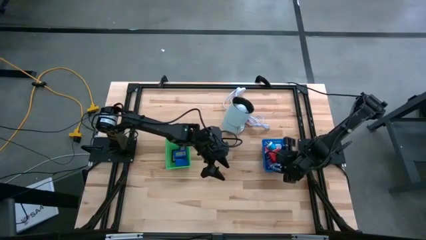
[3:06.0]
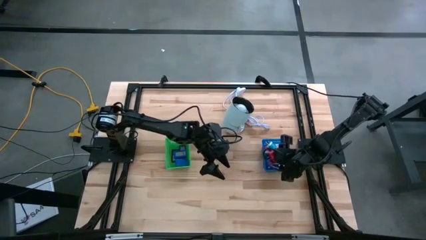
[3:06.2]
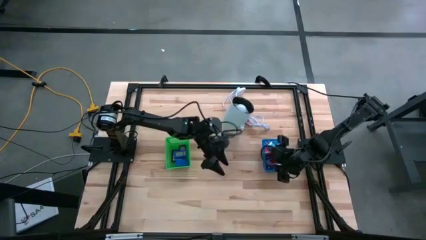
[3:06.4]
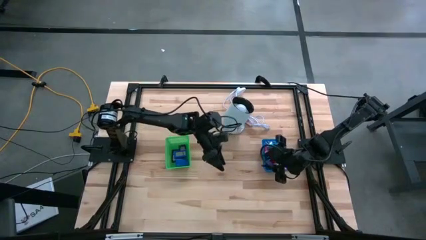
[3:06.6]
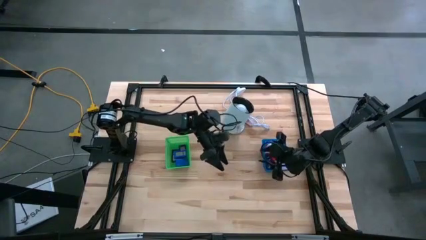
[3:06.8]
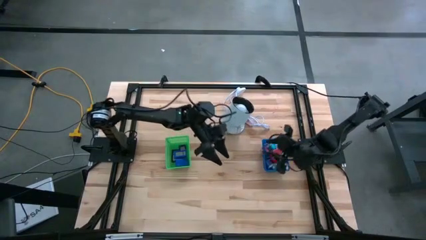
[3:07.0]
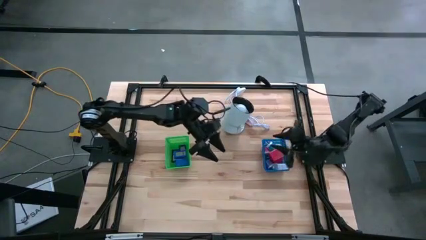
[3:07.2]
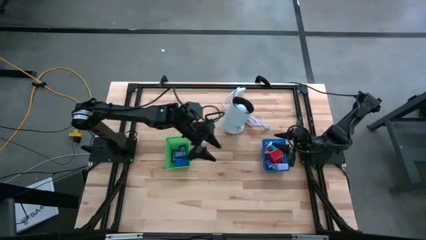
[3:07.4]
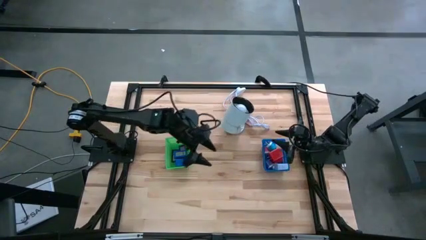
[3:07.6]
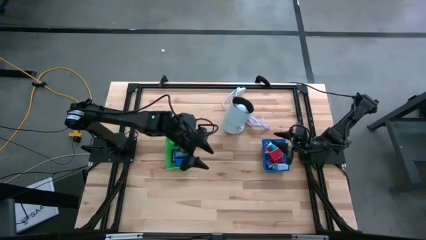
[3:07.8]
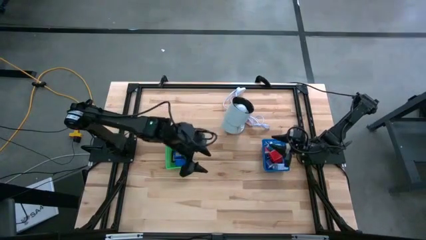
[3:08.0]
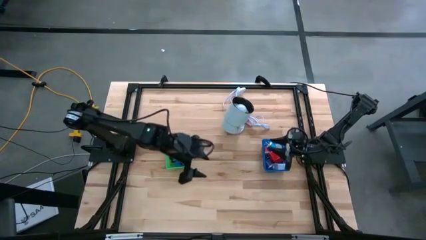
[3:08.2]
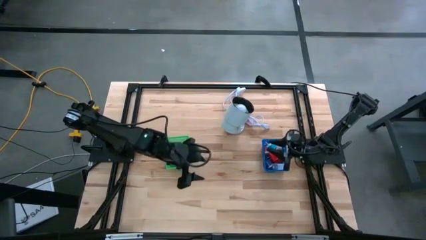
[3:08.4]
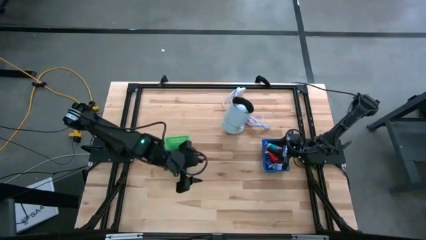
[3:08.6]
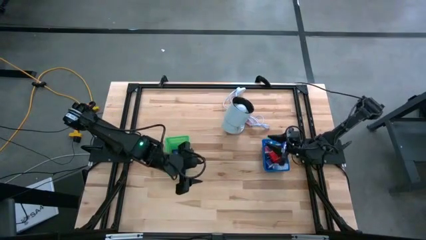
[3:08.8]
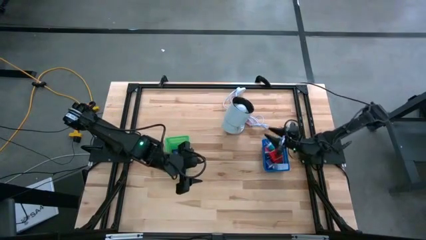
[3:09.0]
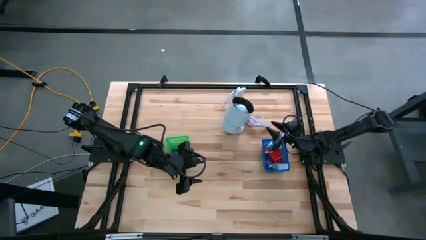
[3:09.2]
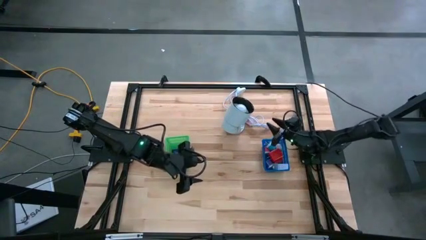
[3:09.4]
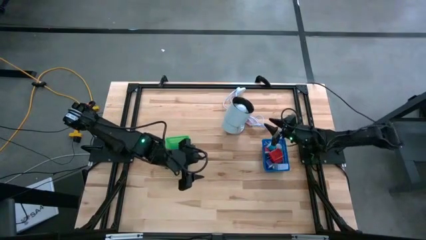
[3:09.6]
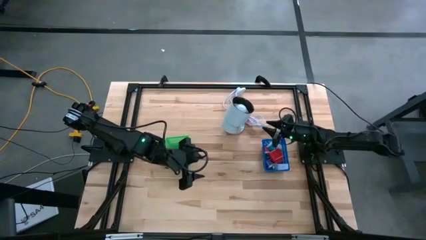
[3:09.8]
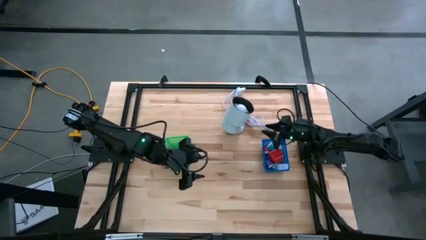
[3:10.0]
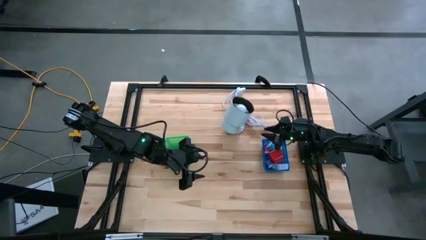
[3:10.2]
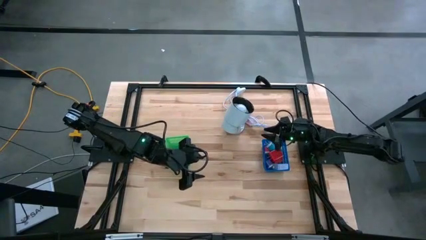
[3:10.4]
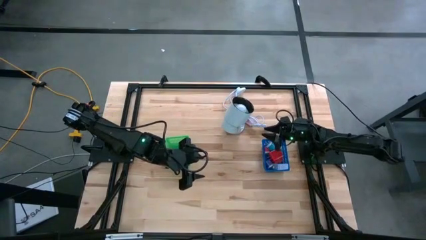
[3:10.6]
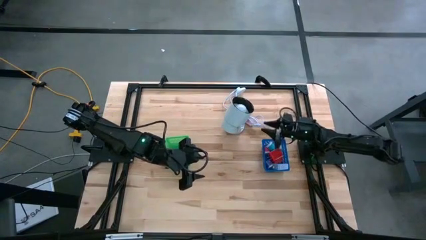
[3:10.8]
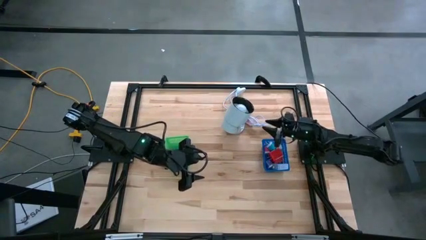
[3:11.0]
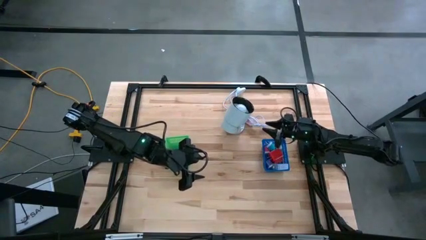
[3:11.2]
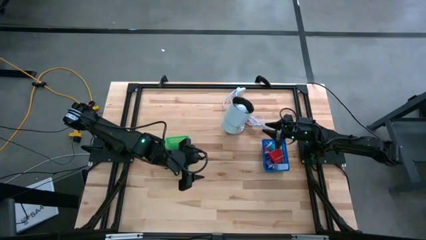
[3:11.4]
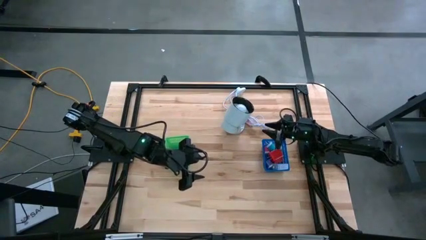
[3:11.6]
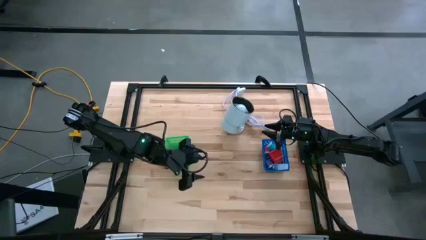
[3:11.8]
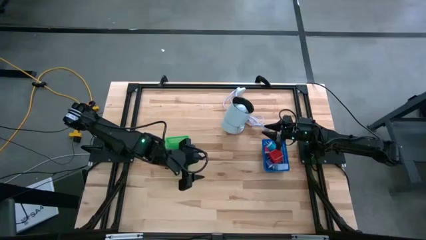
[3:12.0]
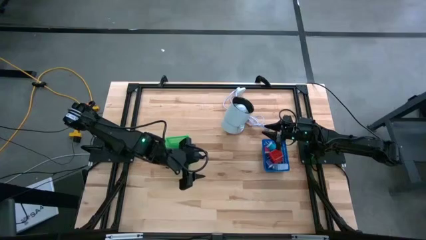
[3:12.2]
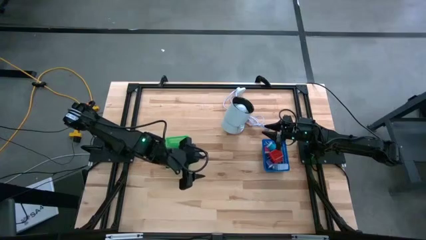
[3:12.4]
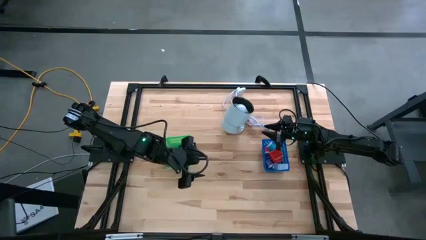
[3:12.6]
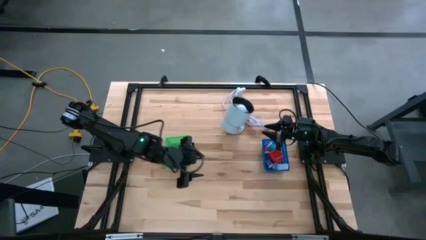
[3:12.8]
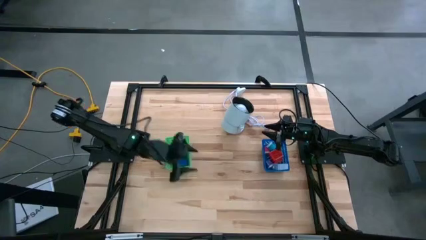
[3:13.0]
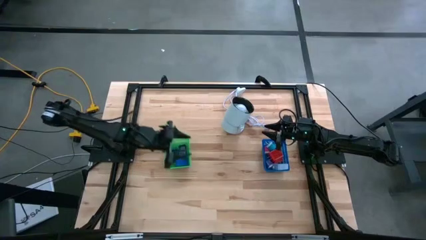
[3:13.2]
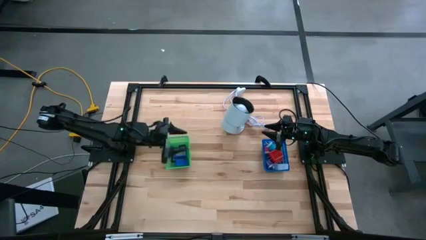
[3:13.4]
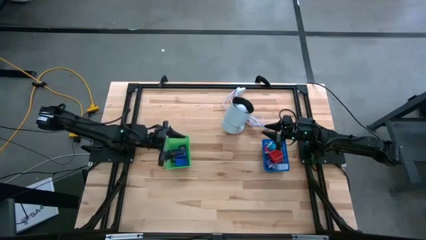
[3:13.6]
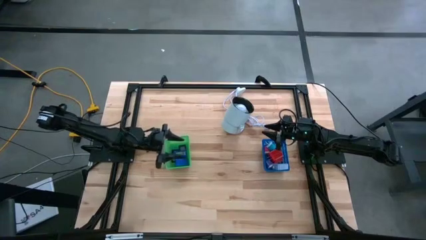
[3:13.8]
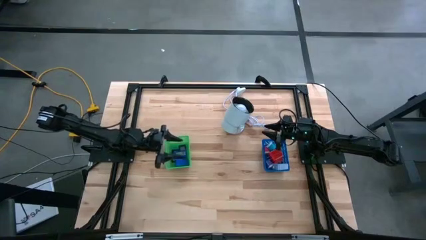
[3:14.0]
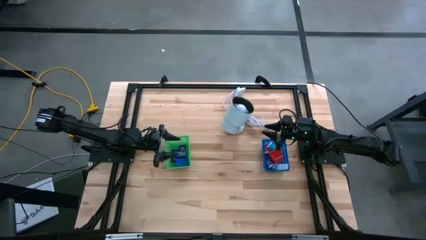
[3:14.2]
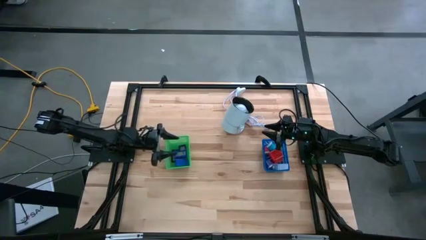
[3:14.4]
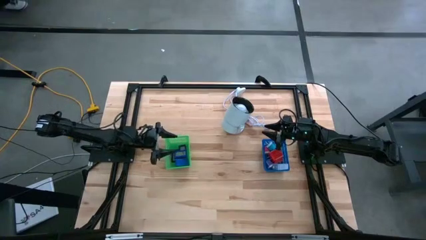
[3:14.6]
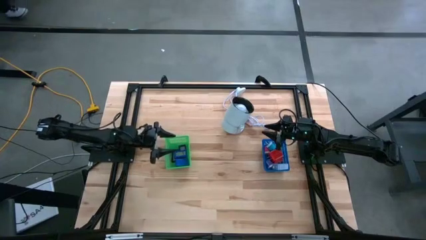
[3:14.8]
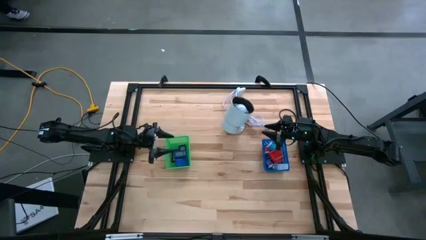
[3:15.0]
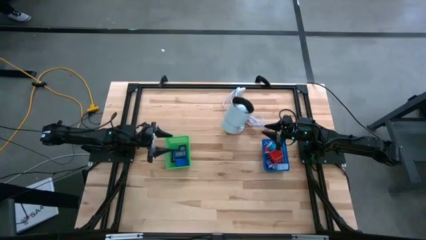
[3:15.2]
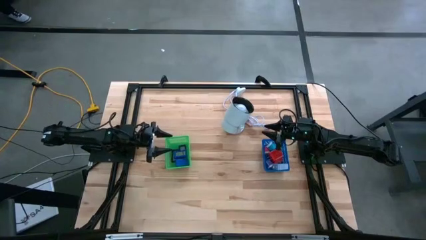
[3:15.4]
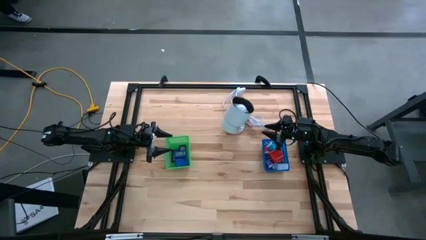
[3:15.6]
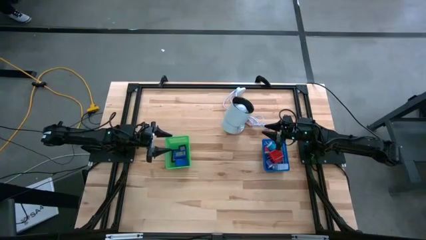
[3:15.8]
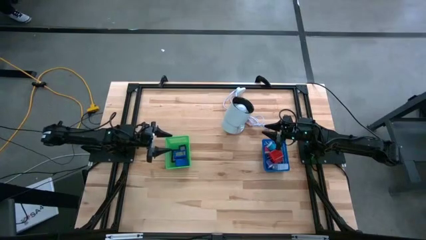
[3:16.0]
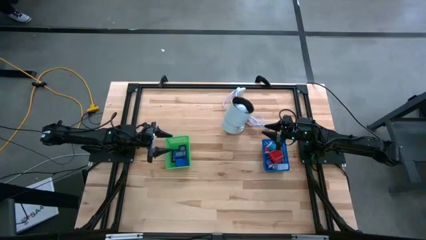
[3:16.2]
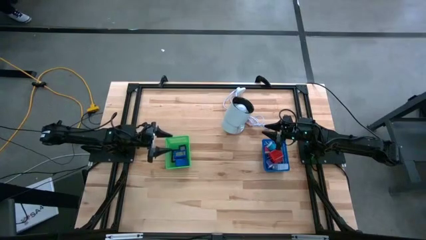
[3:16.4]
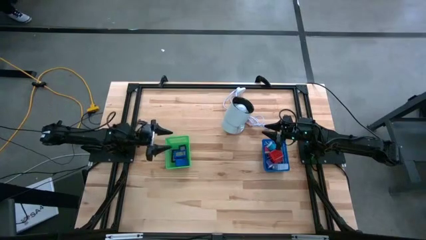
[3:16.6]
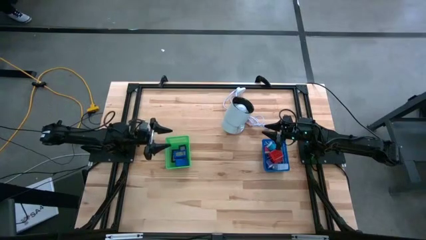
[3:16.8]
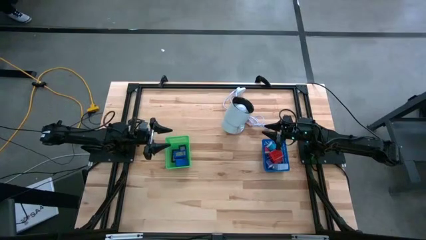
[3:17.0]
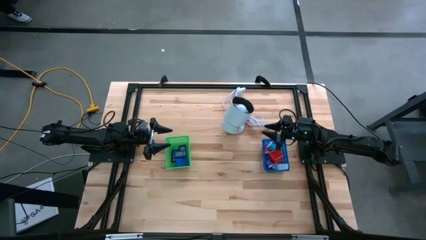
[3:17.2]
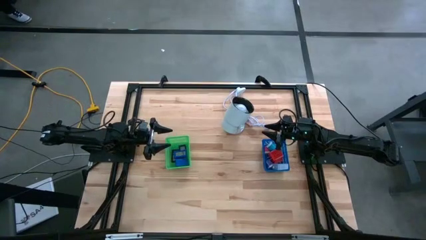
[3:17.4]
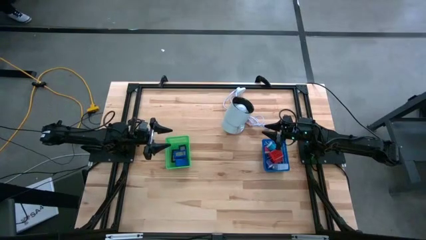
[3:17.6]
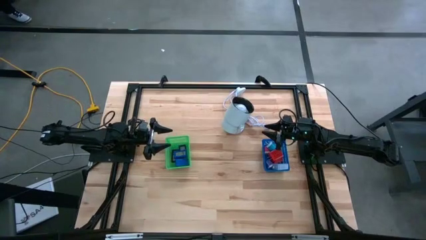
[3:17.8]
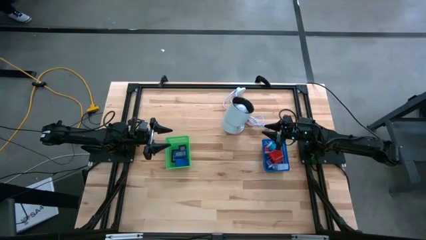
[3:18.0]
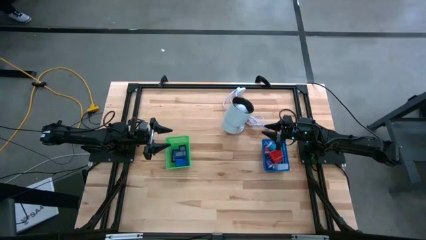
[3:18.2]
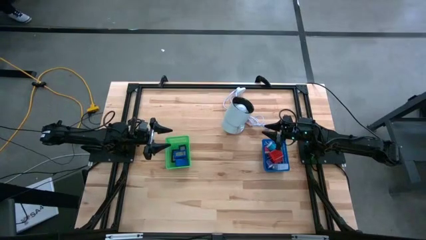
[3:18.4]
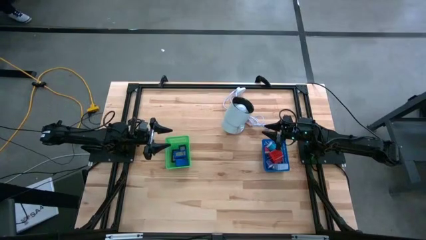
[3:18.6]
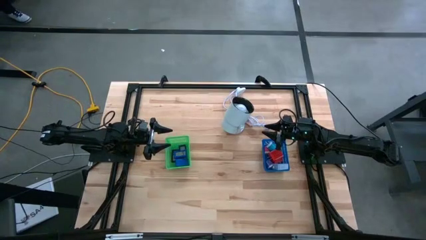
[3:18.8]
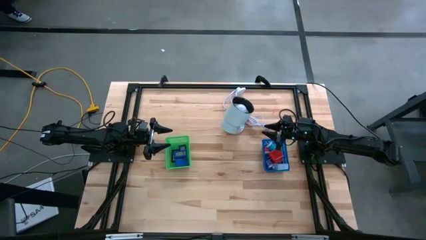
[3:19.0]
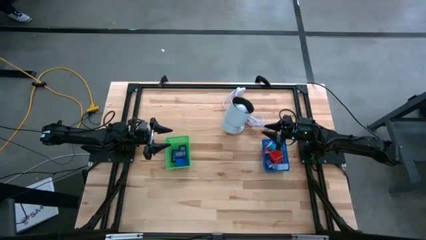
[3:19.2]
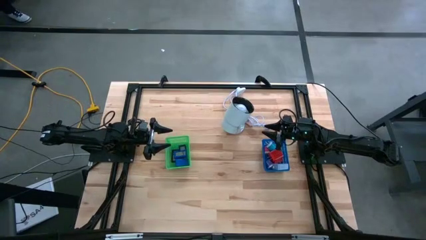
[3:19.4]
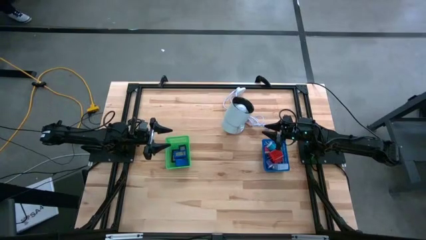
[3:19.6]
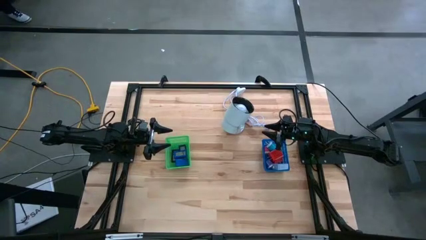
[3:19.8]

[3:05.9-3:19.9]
Task: Pick & Place Office items
Return to Home Position

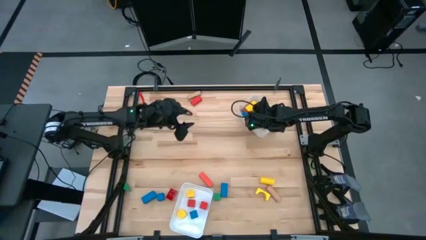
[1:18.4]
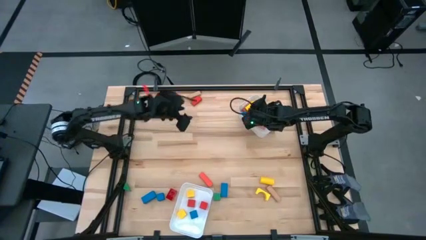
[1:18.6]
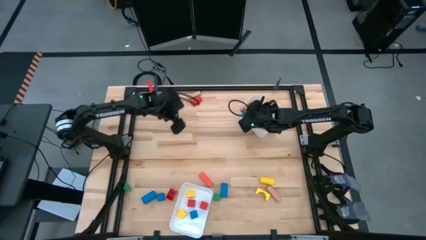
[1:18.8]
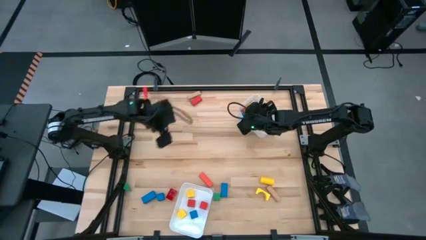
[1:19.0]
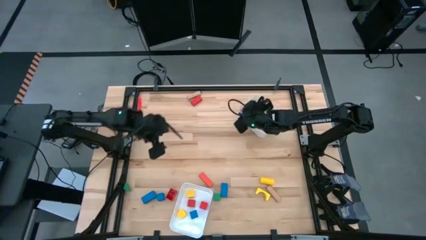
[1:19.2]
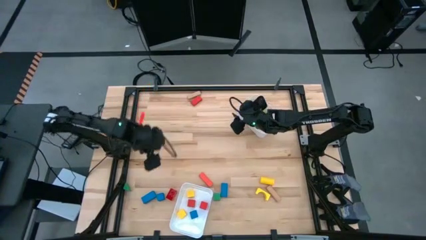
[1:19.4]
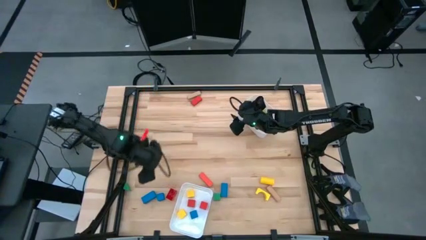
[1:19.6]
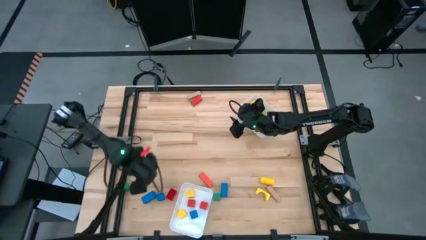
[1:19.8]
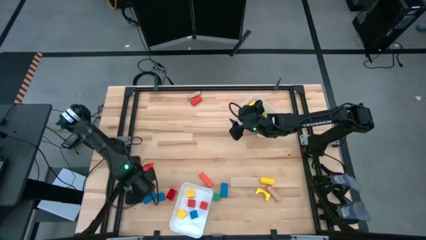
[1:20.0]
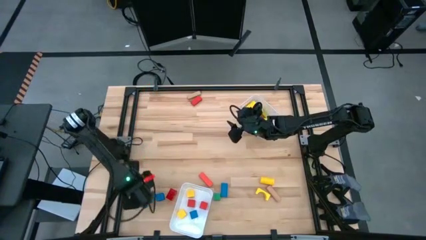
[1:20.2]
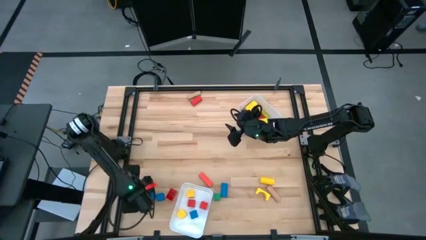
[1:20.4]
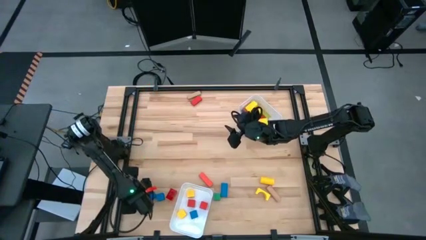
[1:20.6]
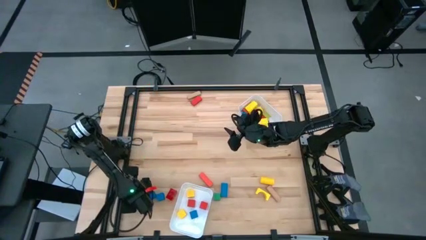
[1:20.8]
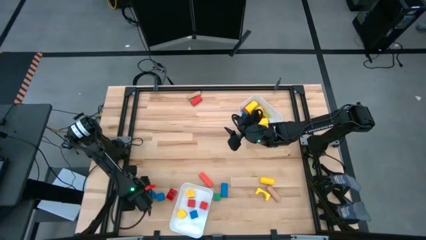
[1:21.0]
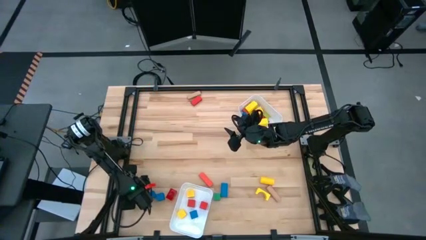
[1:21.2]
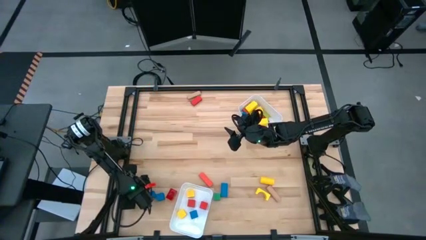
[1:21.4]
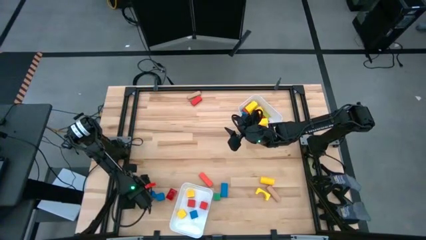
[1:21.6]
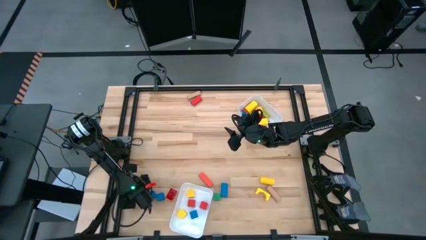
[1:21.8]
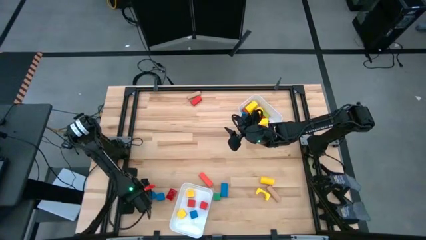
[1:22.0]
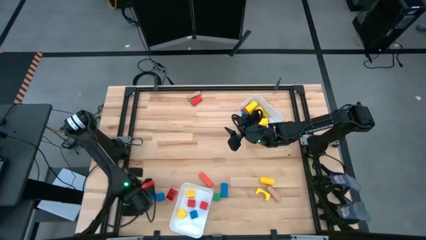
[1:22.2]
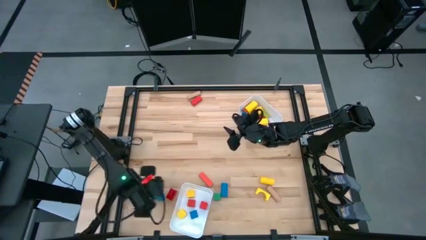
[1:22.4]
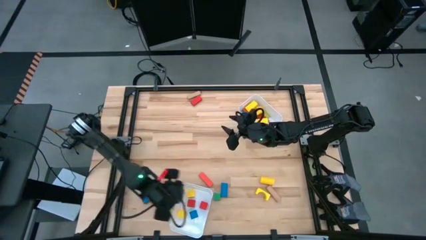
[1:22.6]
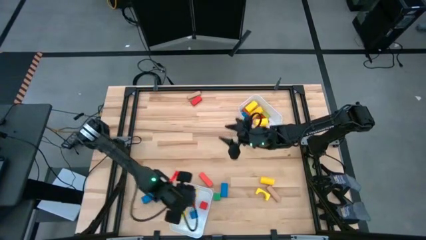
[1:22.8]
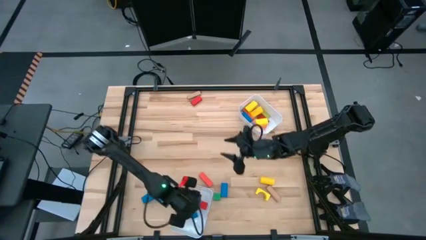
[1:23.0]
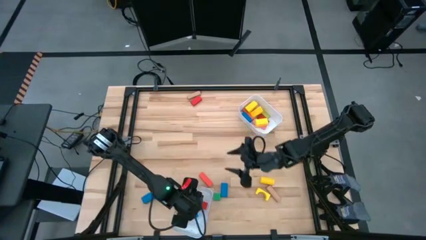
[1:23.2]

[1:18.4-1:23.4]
Task: Sort blocks by size
Put the green triangle block into the bottom white bin
